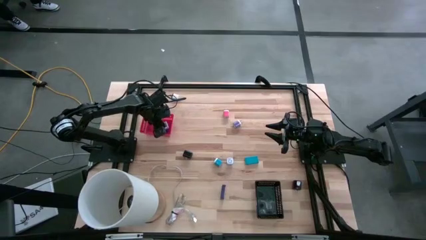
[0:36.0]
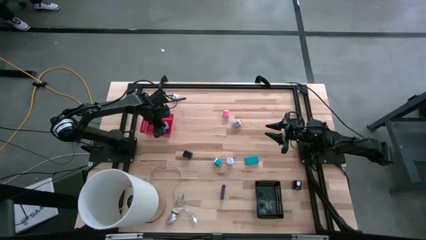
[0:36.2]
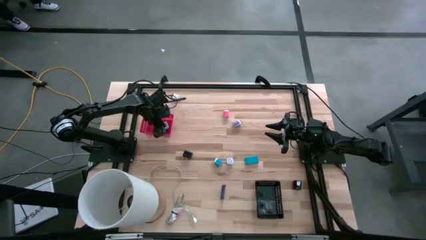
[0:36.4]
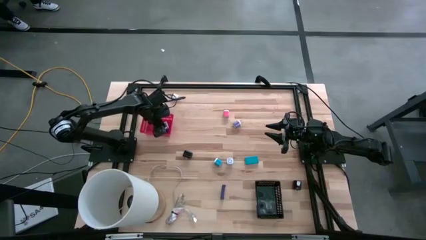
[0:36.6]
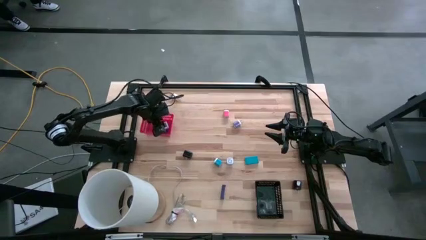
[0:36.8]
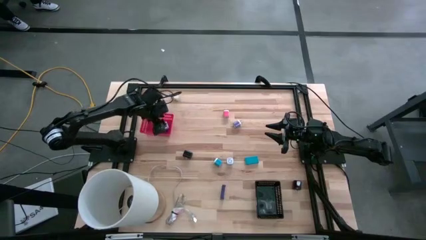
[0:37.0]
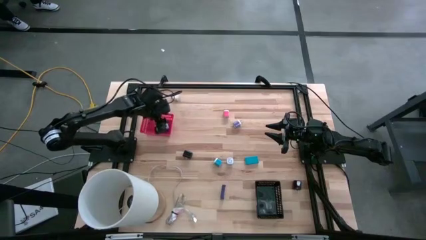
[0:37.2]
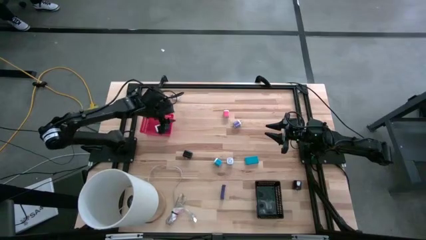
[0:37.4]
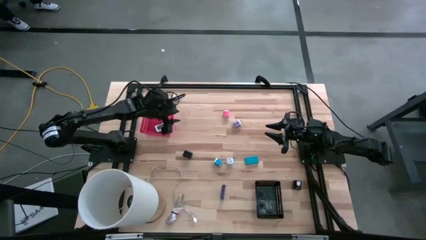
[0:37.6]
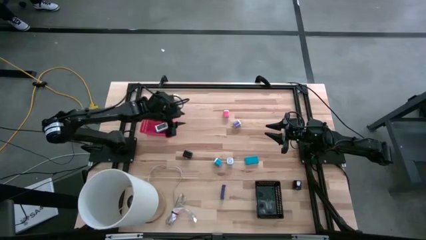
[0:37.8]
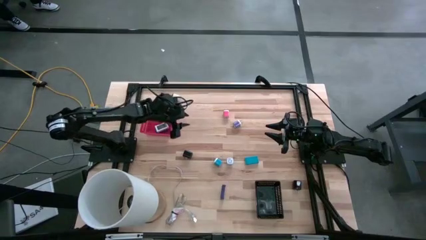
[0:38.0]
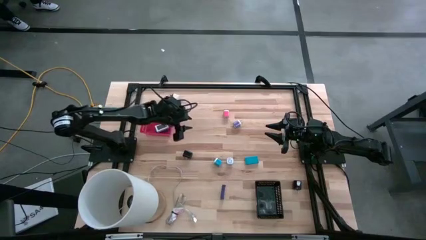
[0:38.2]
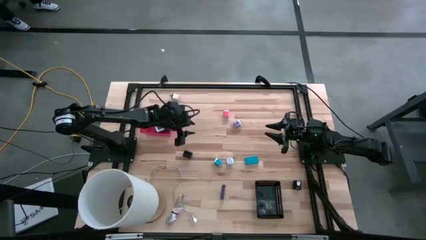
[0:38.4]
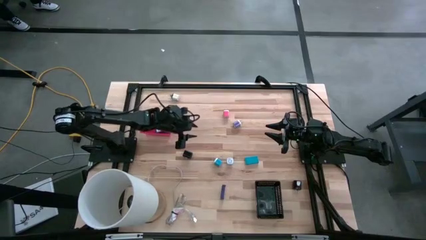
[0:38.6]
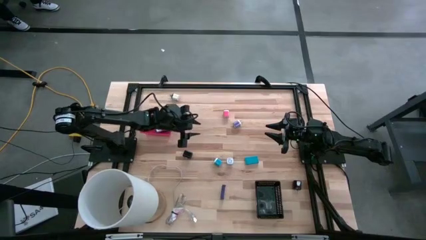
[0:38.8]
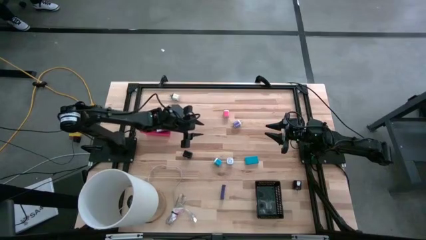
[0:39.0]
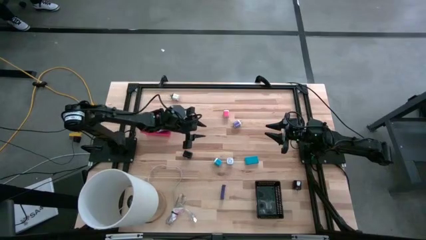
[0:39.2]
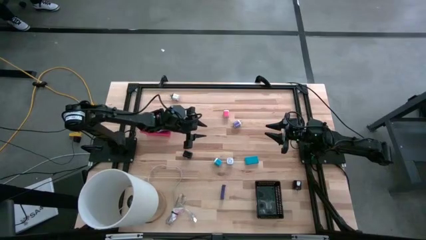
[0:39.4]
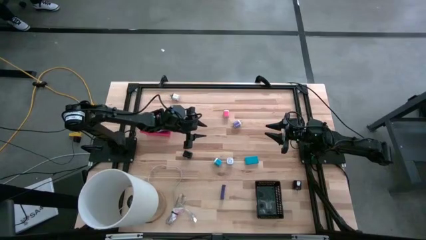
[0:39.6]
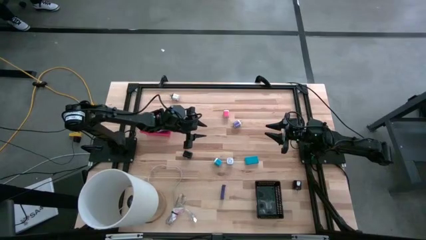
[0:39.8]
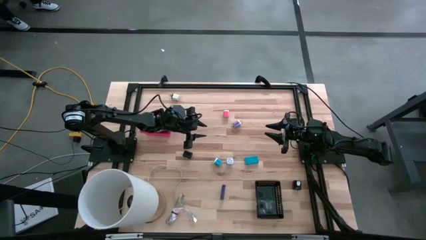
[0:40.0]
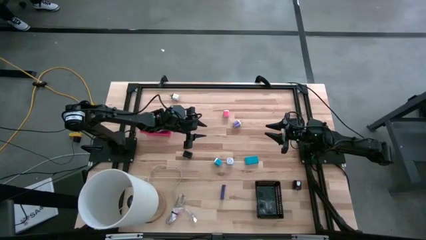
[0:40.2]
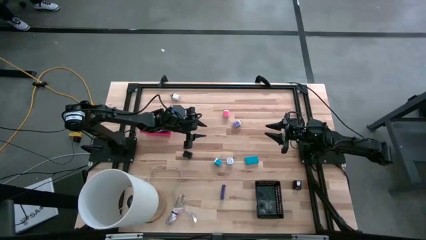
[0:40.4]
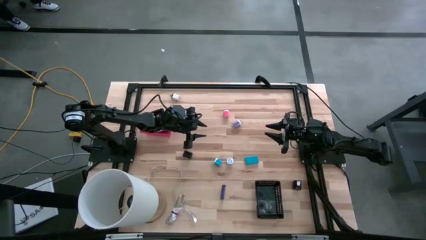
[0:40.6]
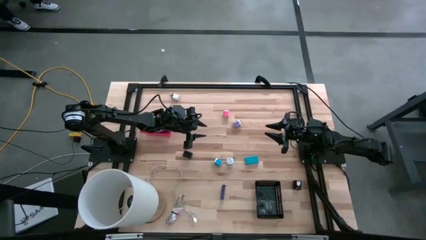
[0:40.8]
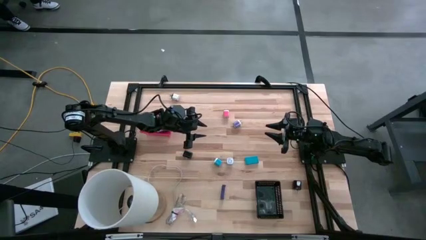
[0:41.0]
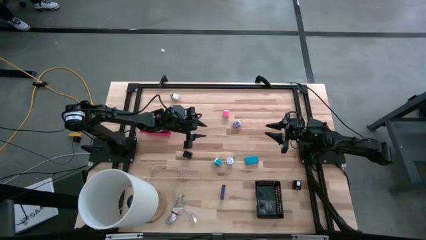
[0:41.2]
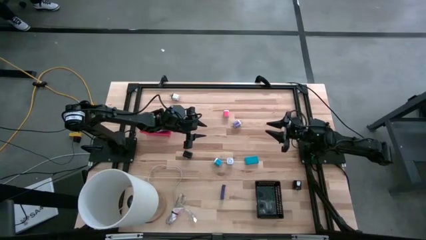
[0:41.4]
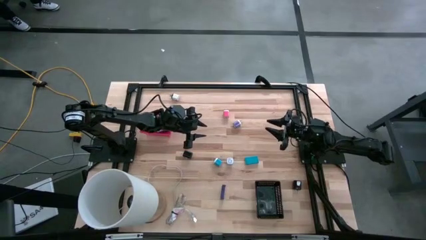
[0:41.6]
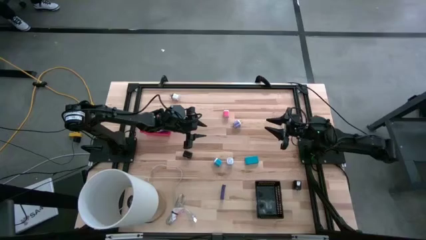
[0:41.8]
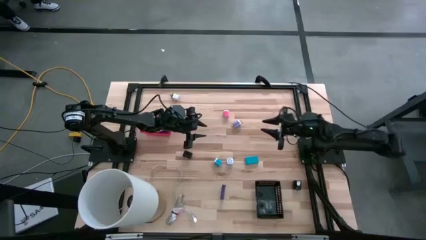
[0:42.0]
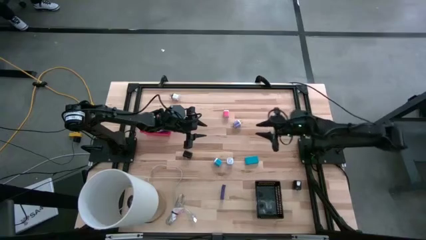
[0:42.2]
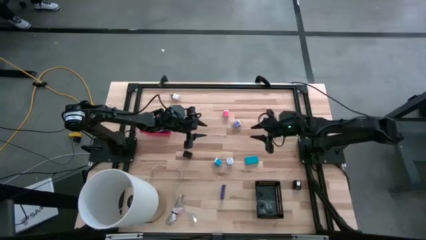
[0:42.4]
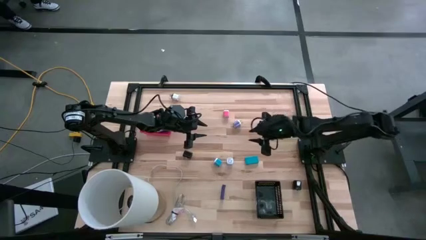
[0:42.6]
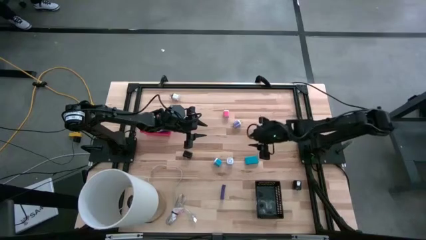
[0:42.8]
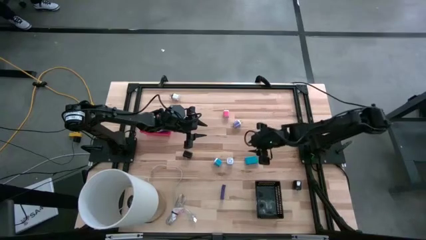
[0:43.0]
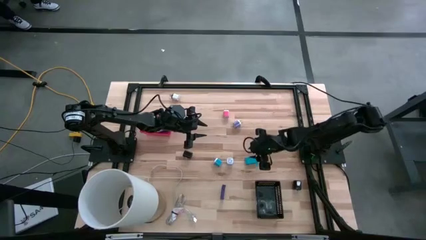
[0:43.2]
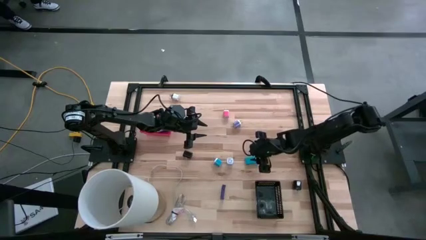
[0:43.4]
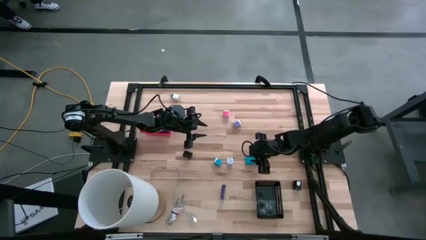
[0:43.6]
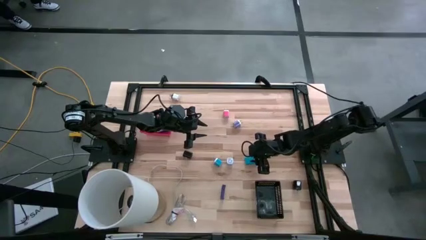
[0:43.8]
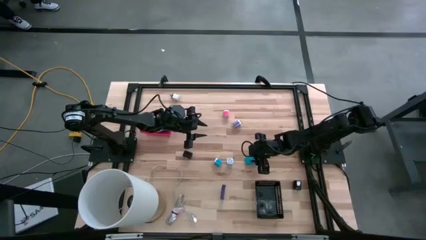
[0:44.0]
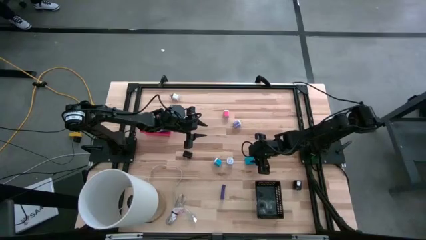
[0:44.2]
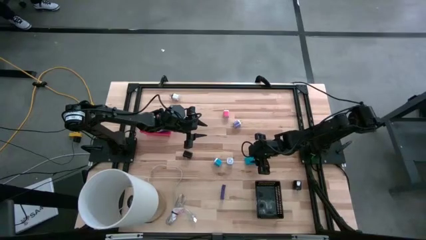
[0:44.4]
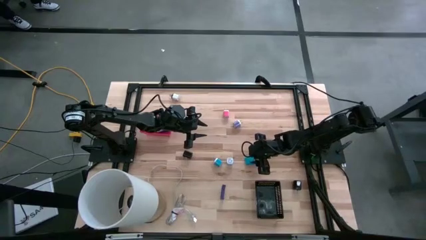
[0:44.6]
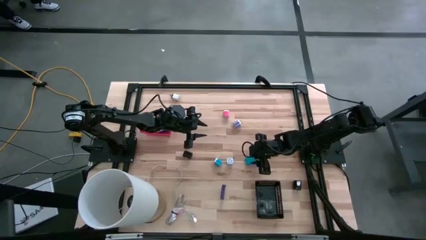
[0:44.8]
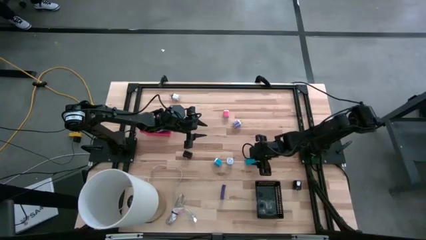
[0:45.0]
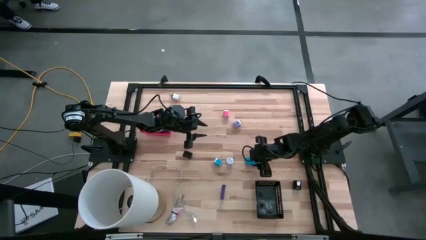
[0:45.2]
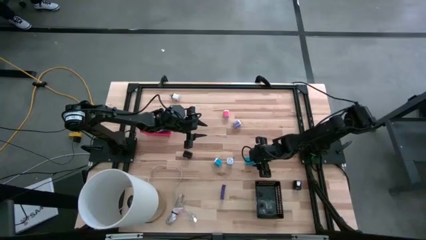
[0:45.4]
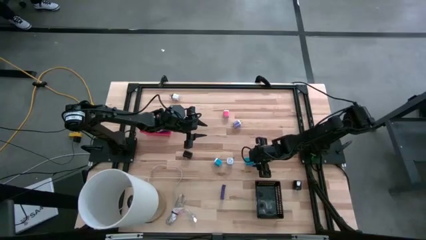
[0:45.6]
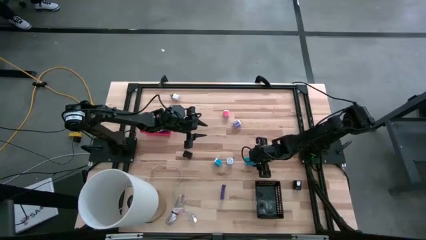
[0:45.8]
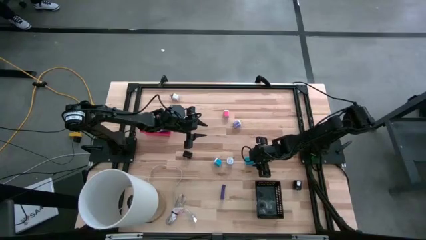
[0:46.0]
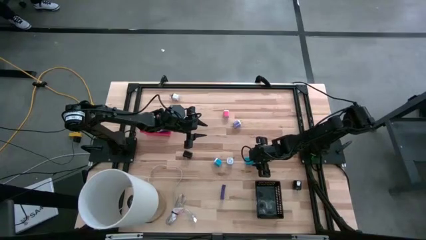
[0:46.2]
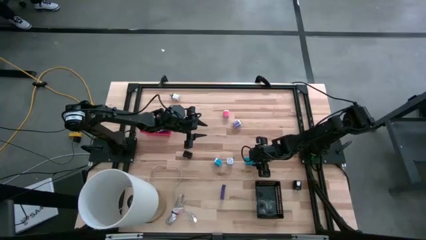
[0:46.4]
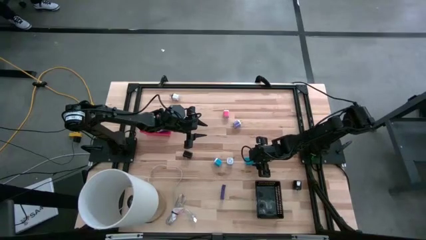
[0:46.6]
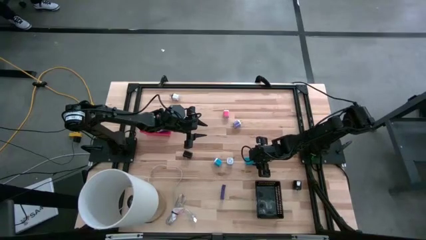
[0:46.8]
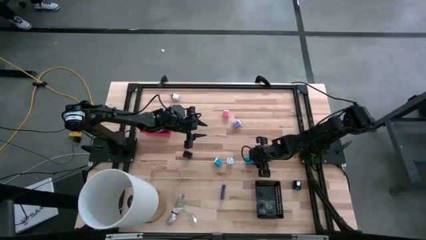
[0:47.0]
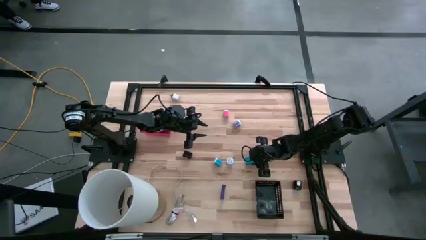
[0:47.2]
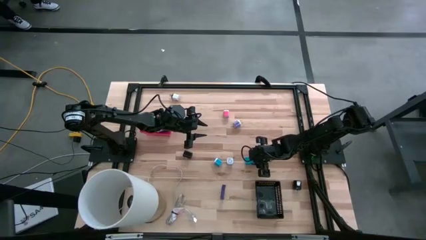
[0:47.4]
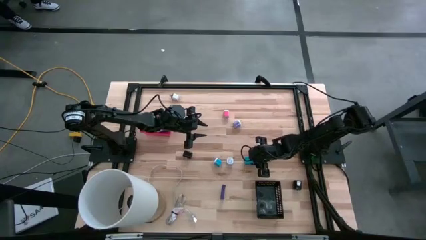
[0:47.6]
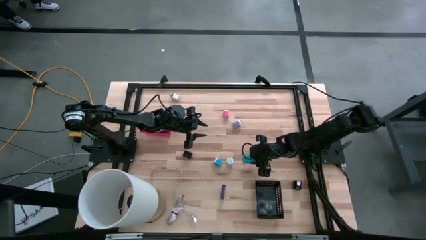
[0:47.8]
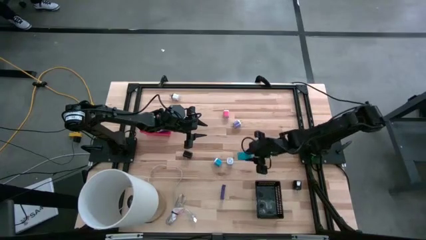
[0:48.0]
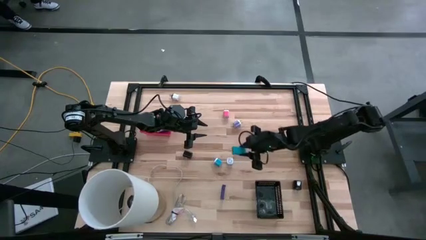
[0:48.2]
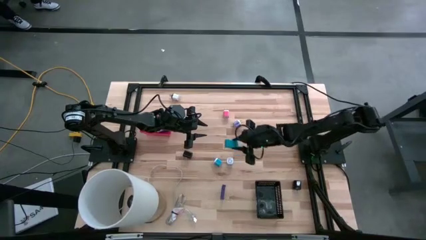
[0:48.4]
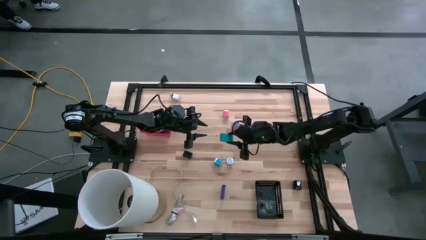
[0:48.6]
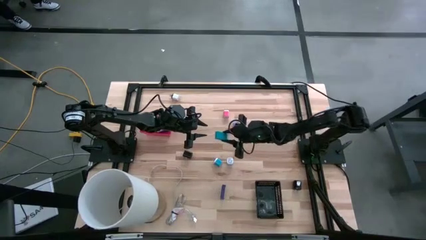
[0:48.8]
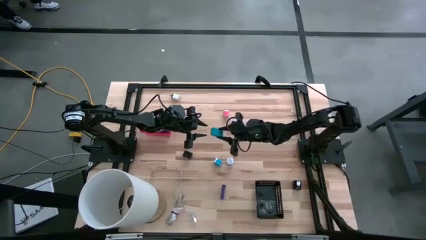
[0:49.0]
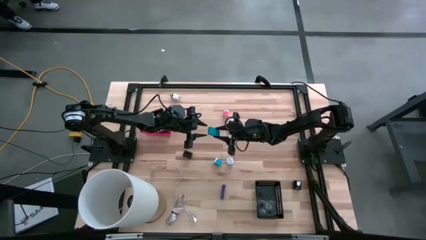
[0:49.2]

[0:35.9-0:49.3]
Task: Pick & Place Office items
Put the blue digital clock into the red bin
